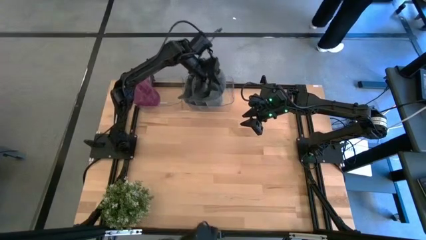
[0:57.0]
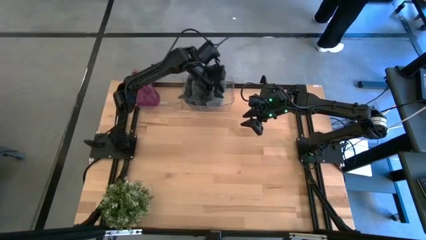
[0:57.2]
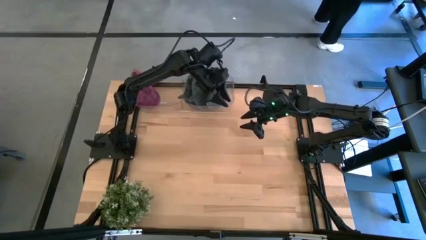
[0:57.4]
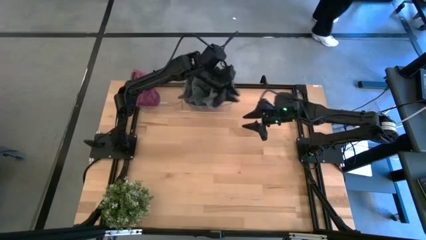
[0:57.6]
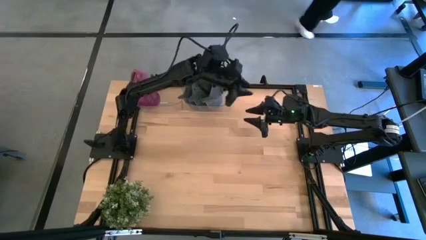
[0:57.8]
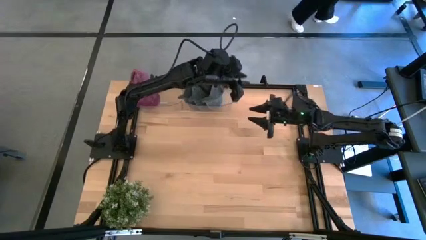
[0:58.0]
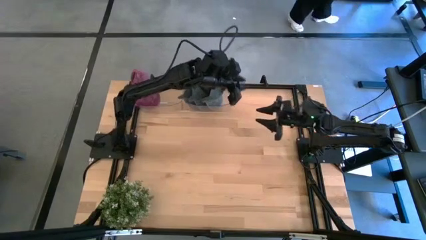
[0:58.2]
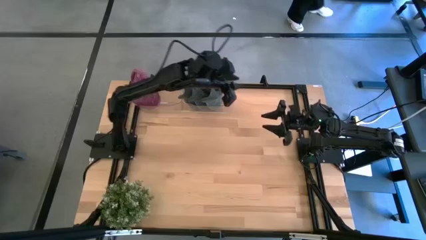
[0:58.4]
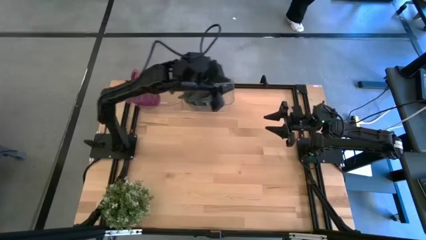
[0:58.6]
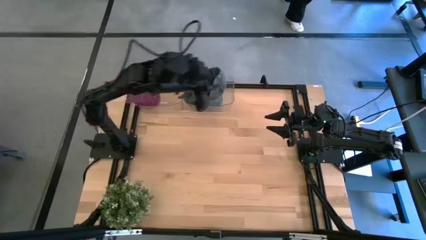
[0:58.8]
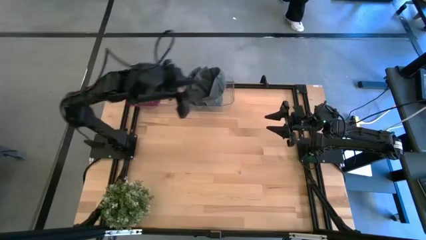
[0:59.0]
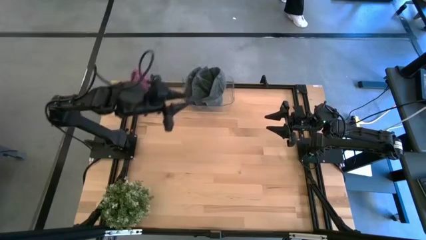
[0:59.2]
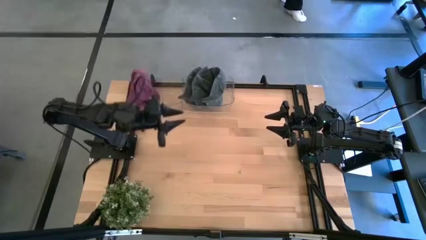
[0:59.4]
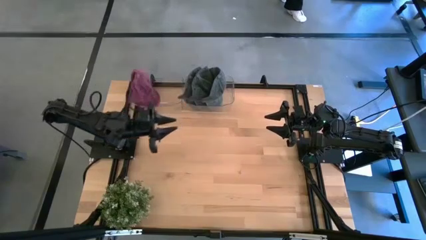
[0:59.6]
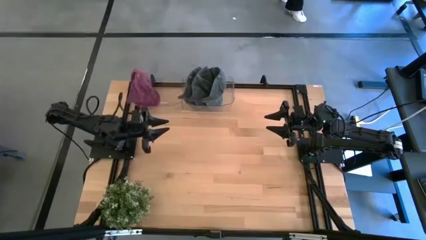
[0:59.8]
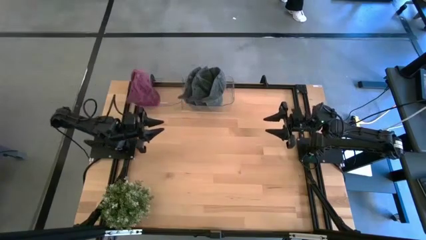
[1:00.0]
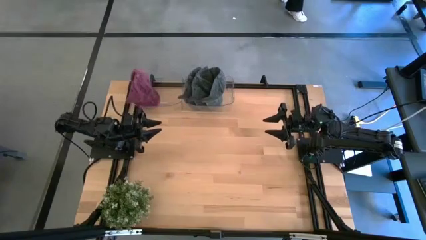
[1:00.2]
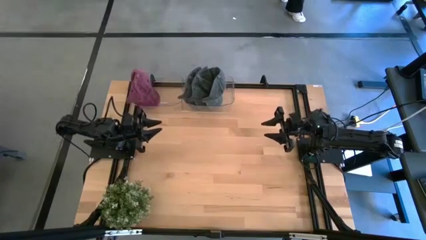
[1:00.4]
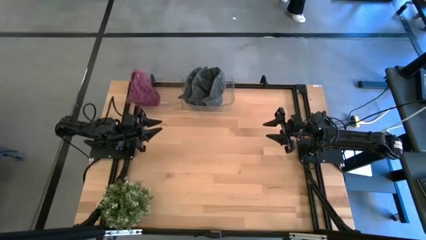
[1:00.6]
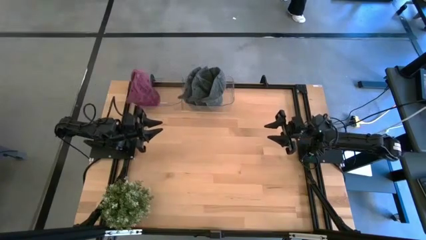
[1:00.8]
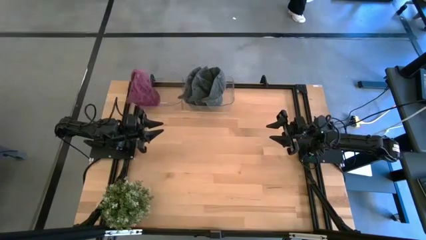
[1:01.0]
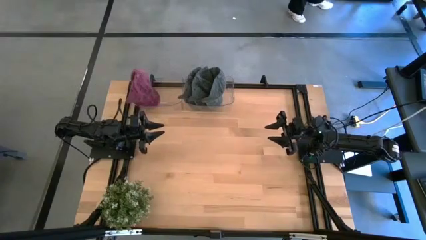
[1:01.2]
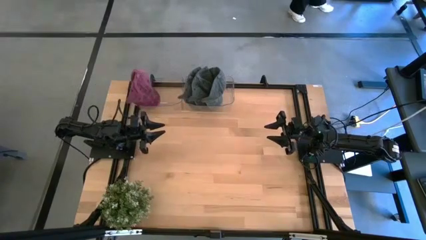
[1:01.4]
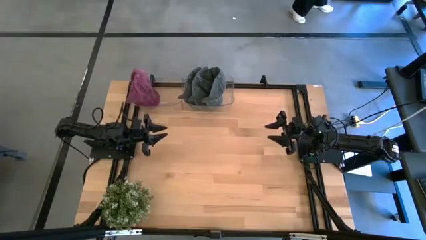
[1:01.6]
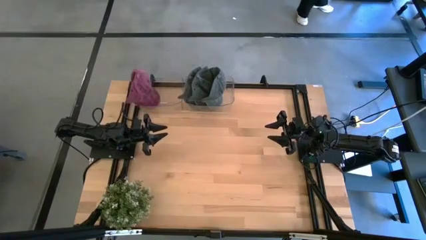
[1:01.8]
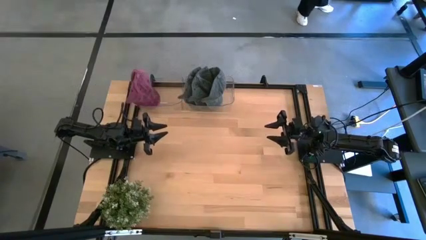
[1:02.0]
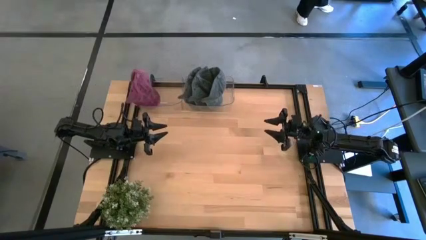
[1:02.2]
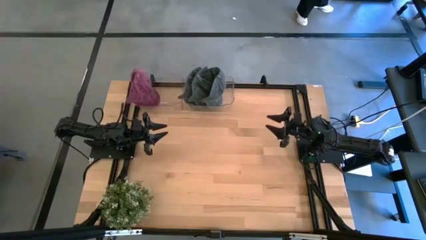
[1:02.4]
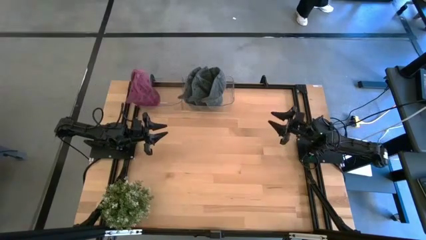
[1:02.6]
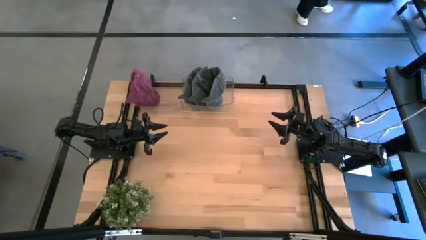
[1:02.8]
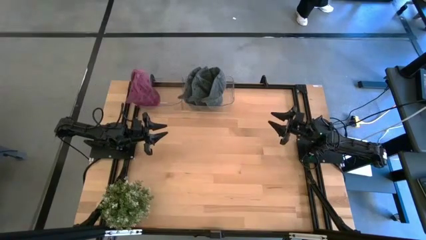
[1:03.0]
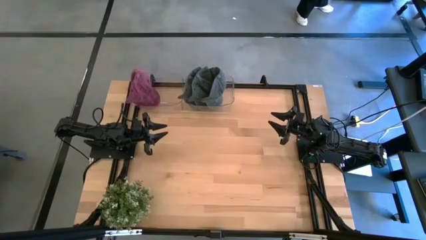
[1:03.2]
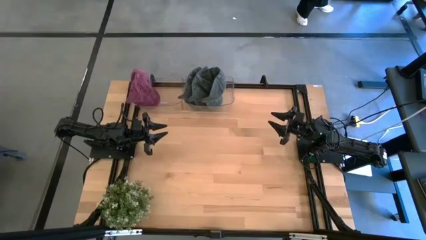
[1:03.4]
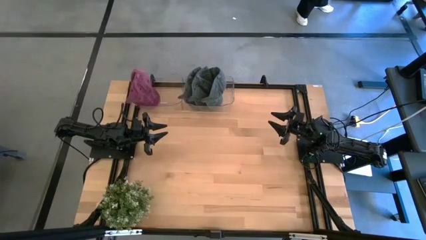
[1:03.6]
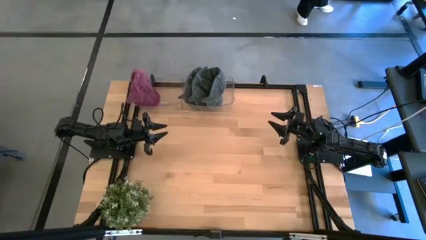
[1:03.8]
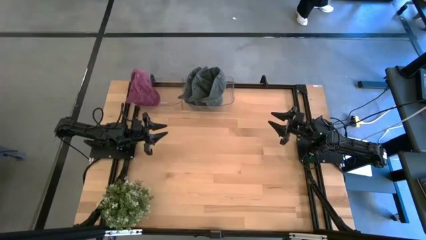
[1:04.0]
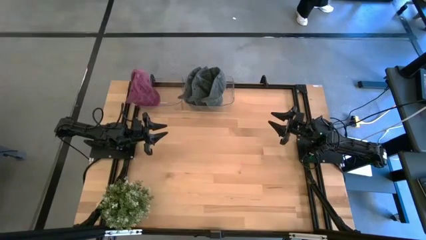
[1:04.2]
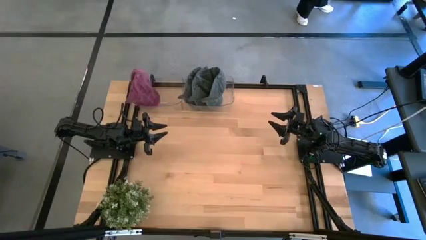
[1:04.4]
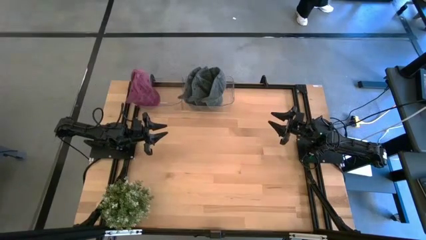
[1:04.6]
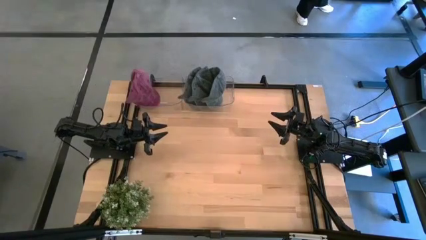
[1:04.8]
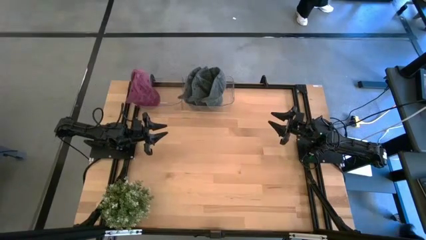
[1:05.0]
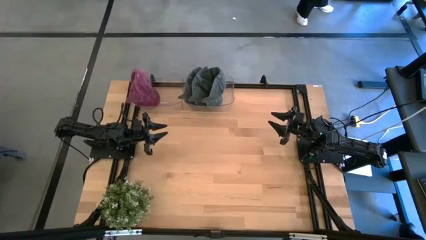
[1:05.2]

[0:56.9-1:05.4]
Task: Pick and place caps into container
Return to Home Position

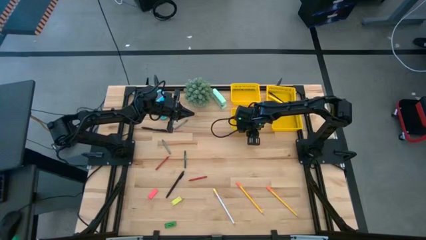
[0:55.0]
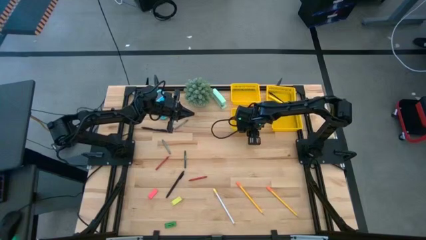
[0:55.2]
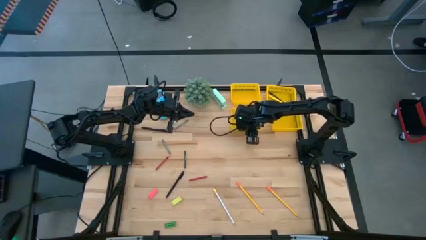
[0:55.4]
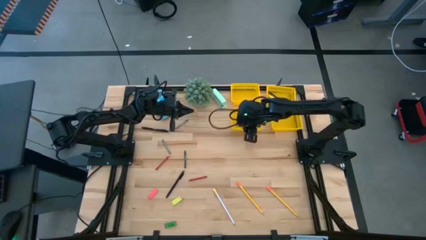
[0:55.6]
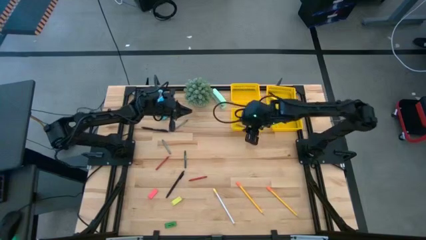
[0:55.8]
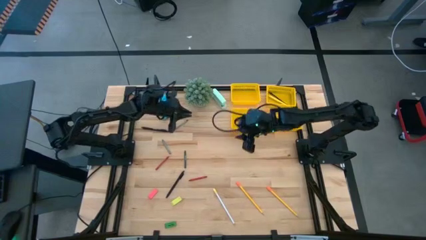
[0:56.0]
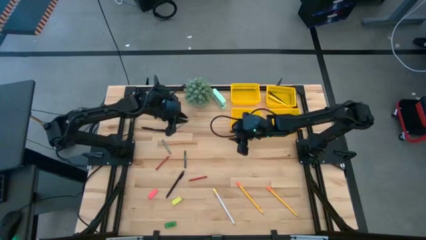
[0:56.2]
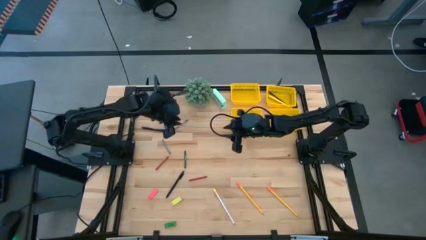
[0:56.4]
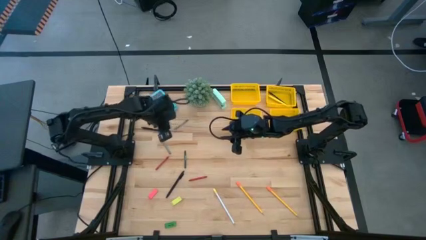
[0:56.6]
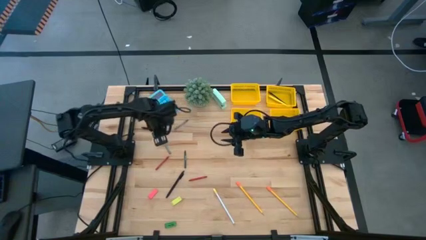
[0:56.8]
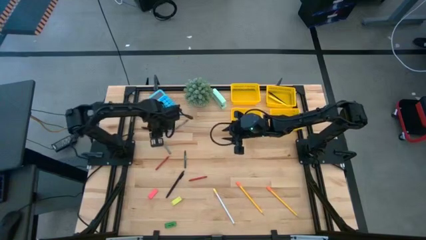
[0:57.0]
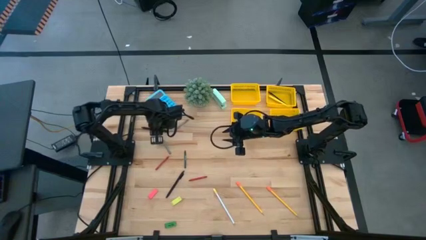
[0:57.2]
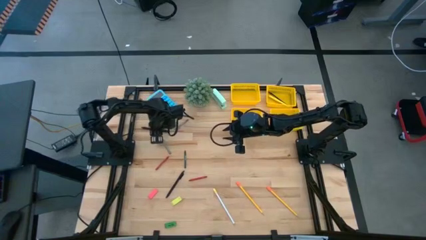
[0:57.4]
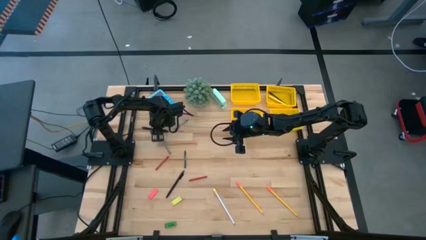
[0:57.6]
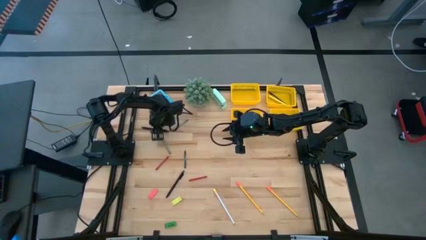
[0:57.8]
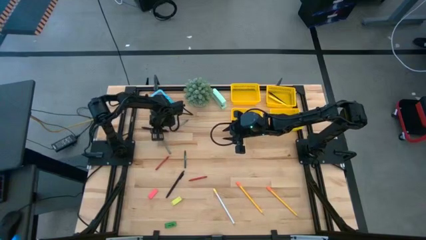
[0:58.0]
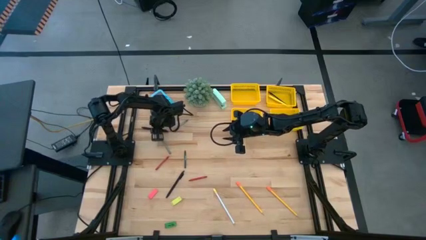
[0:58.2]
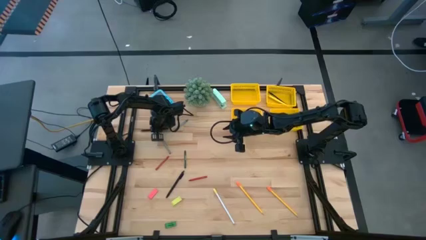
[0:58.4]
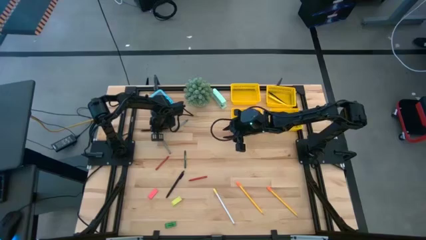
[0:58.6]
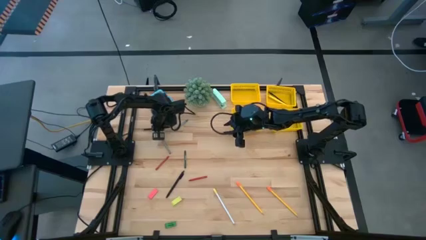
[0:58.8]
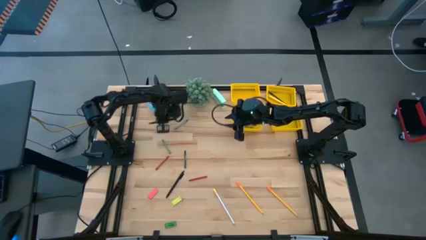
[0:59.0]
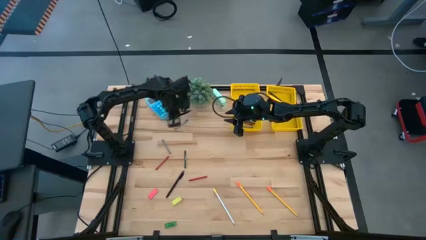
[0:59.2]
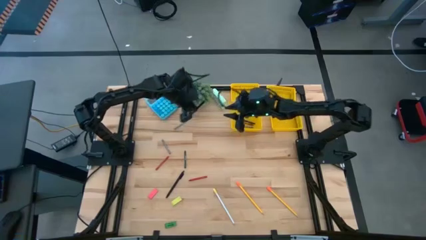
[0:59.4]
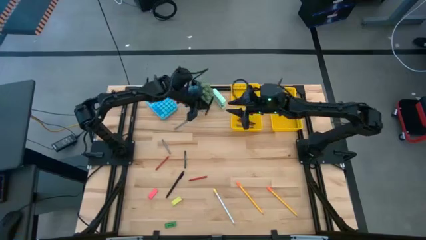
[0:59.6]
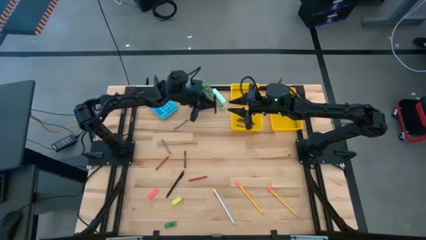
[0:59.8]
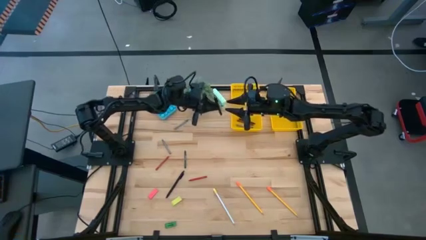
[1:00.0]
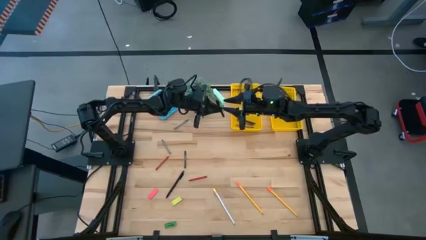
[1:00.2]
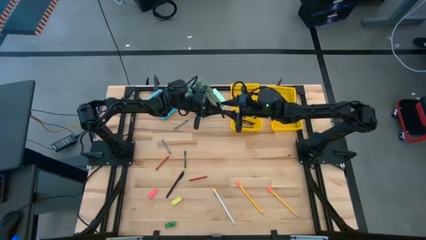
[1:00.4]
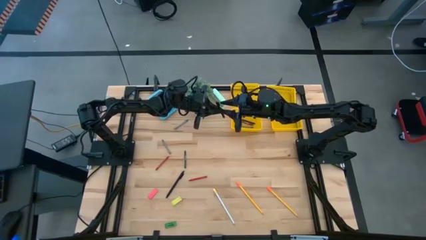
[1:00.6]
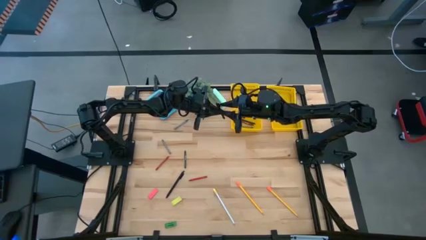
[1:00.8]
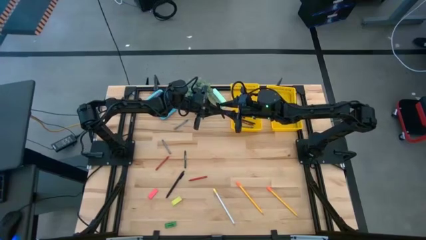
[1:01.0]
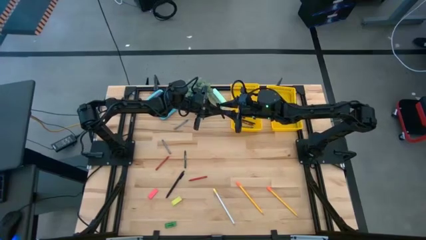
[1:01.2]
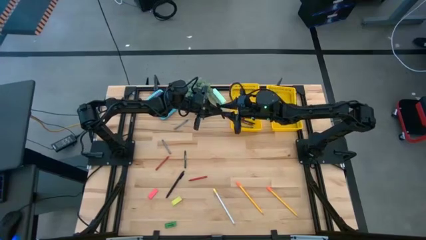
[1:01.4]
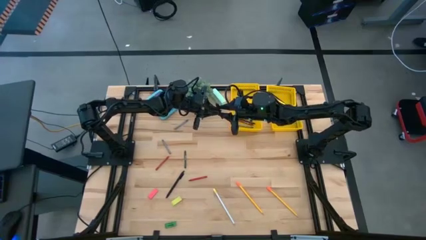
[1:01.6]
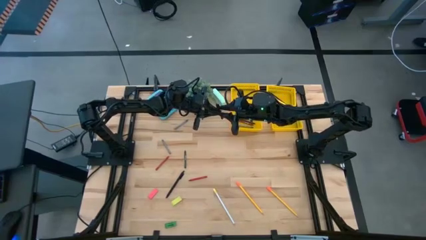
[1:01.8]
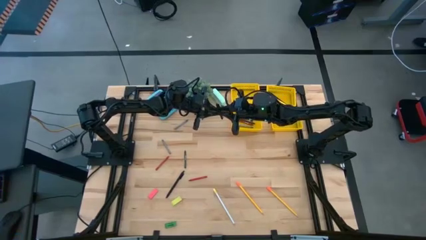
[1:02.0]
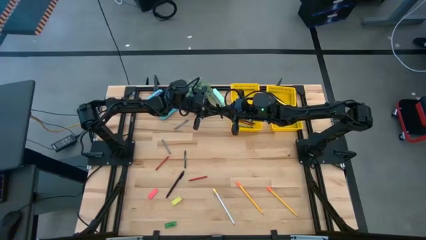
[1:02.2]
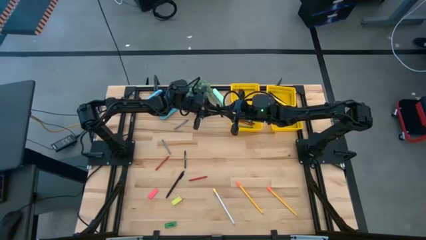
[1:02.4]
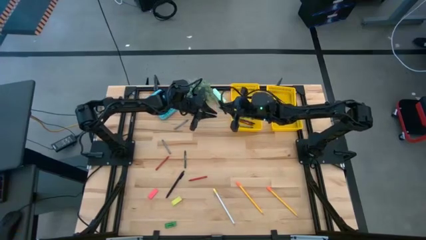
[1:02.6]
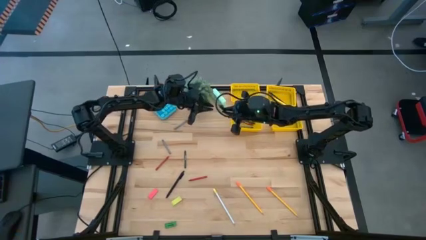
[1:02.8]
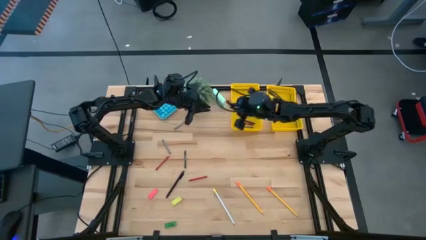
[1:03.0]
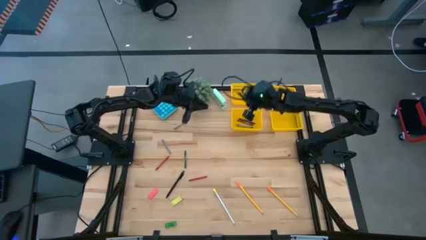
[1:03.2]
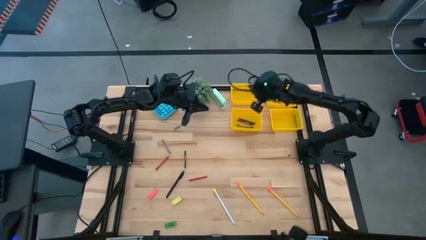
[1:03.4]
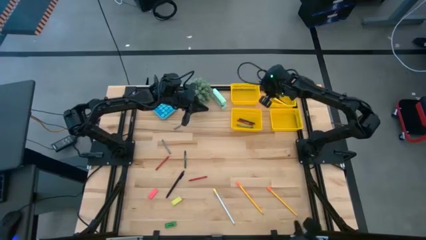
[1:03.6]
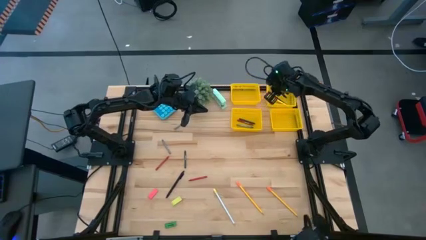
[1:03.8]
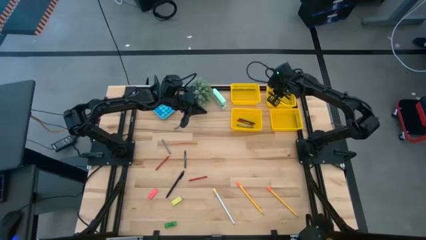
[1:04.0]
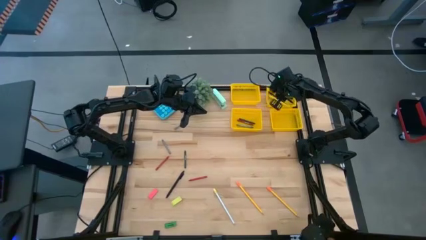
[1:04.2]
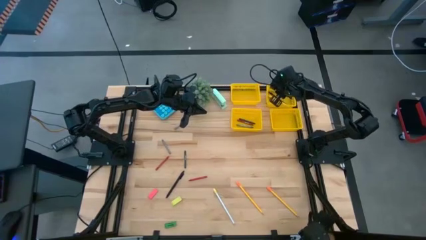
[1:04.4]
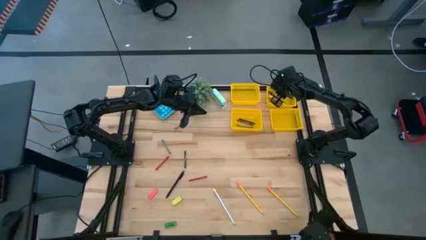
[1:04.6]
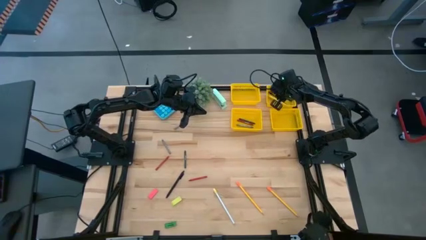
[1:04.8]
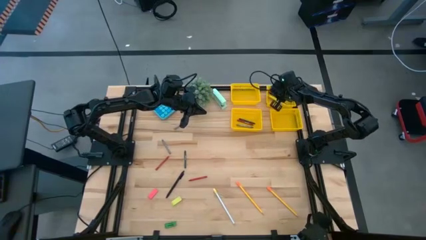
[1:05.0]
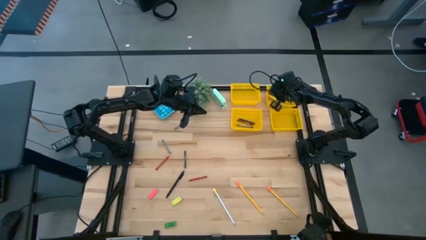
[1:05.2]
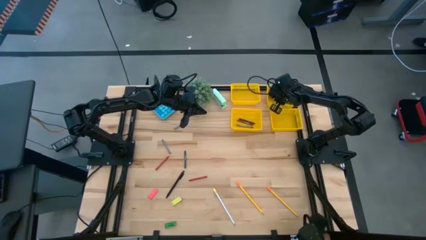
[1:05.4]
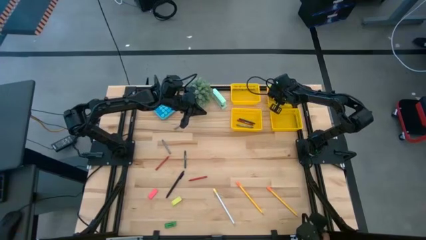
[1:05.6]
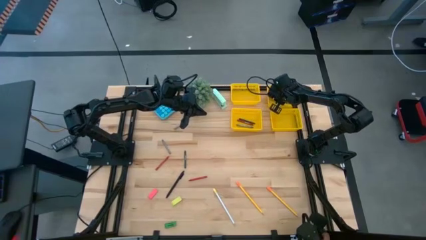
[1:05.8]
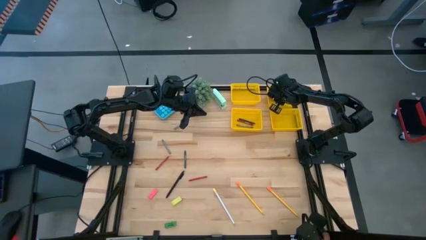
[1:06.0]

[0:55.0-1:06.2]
Task: Sort crayons/erasers/pens/pencils in bins
Put the top black pen into the top right yellow bin
